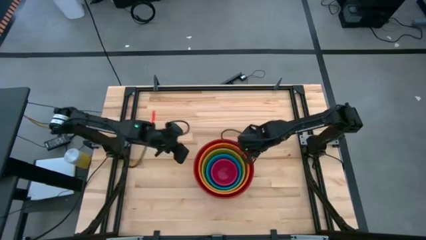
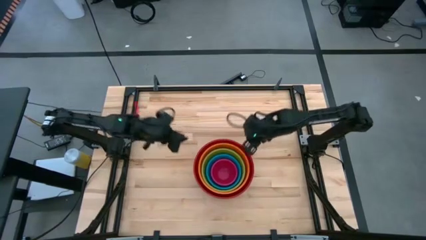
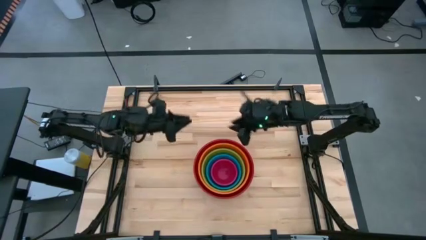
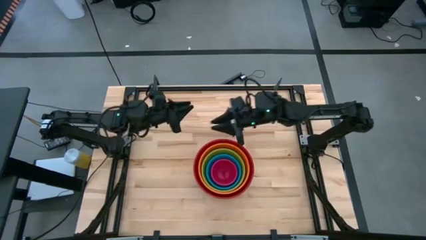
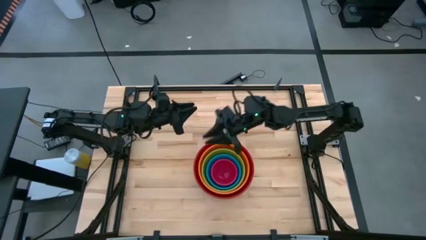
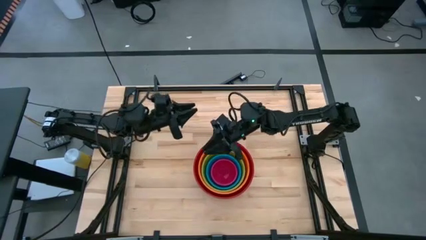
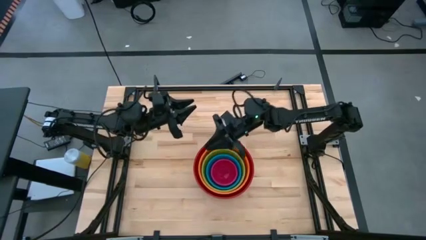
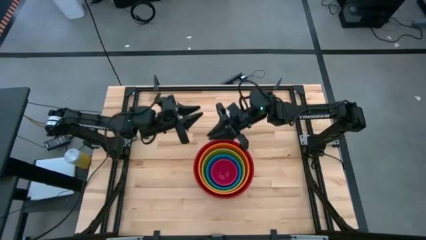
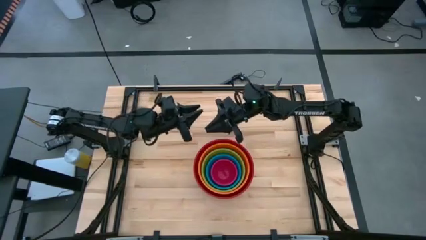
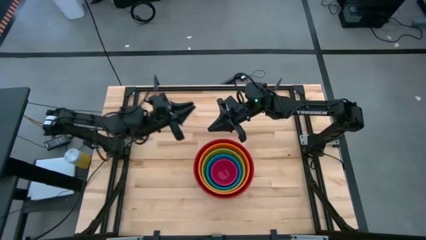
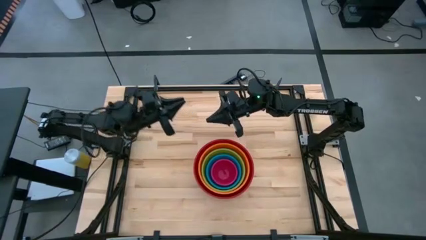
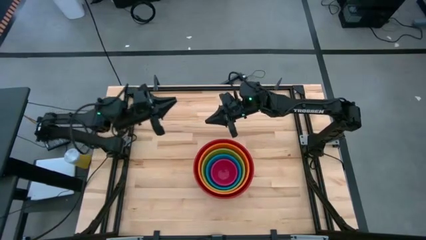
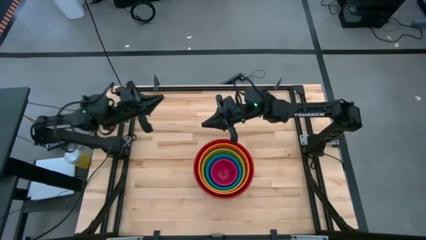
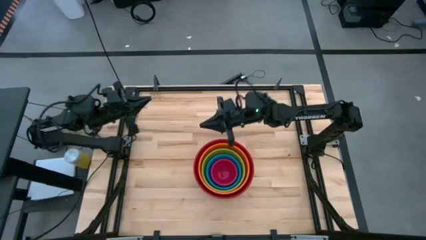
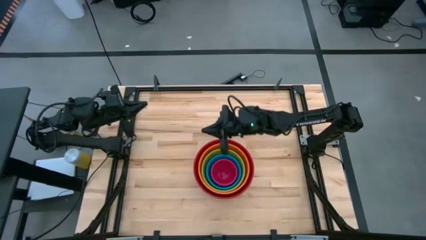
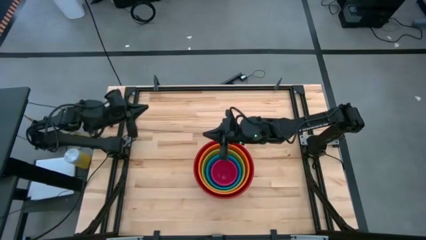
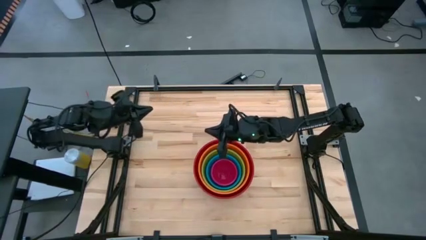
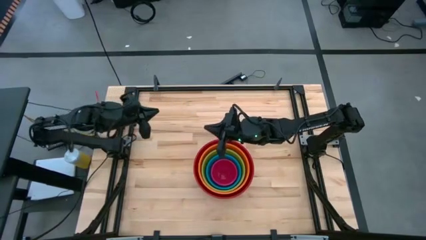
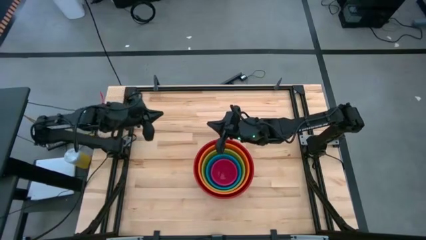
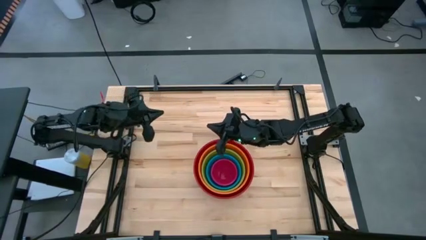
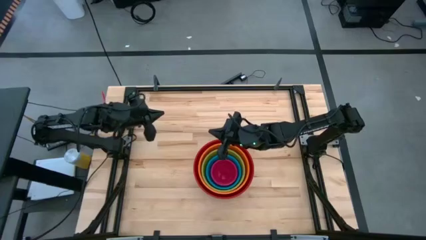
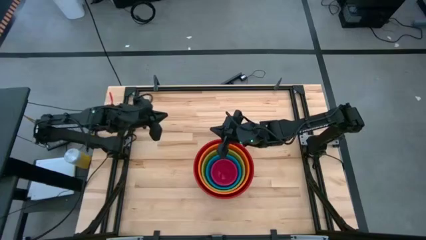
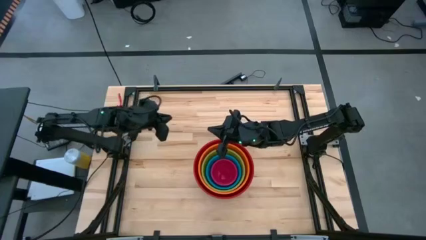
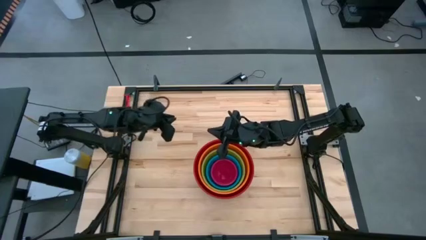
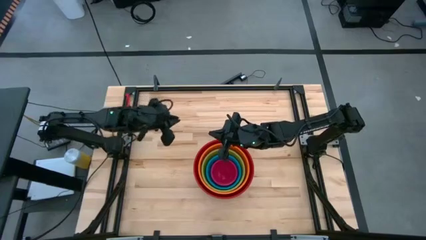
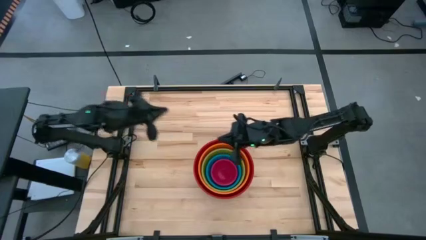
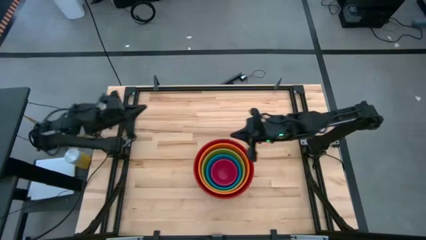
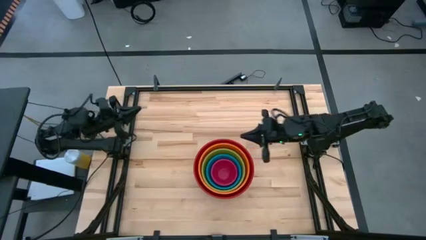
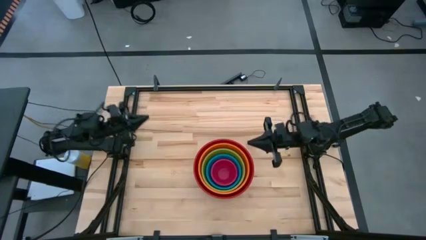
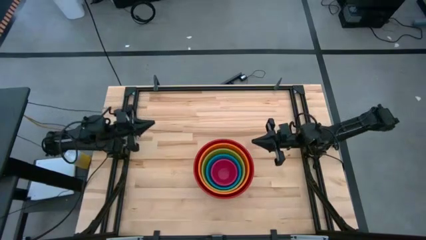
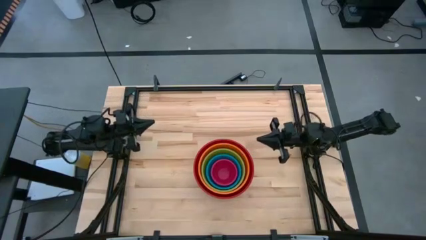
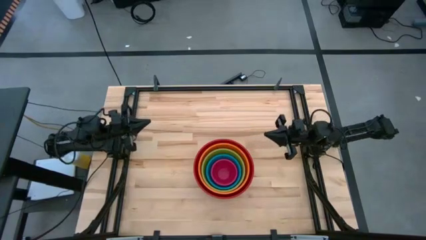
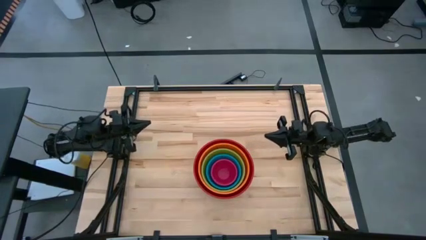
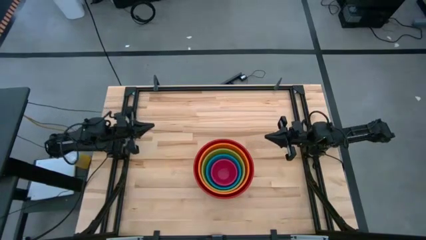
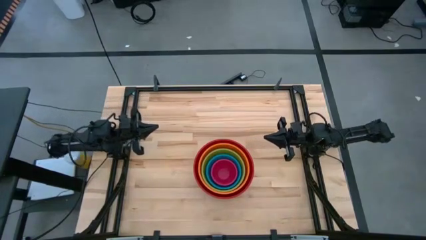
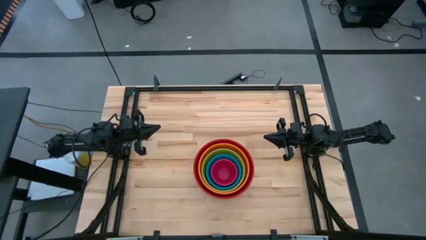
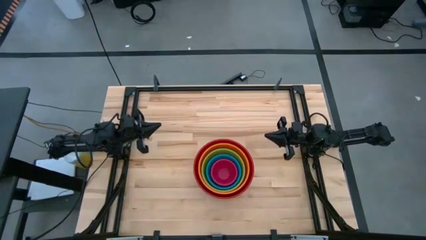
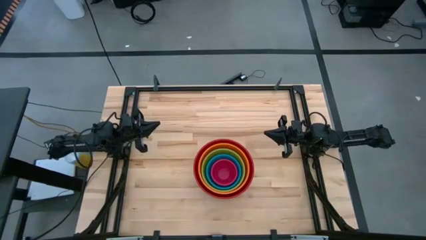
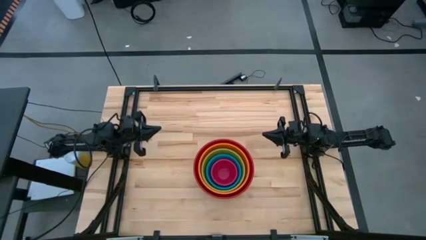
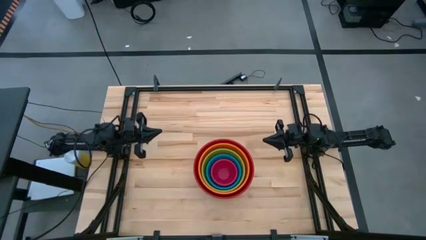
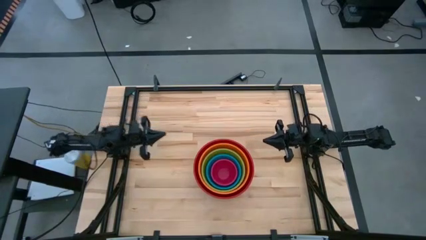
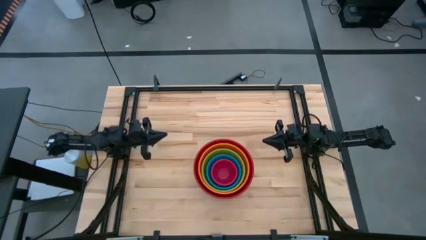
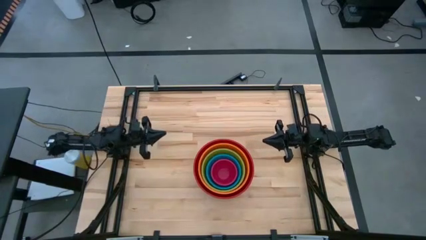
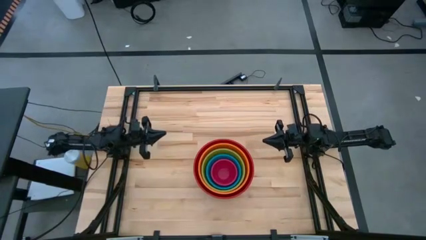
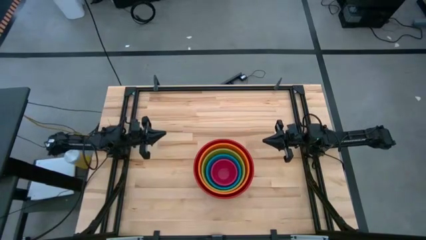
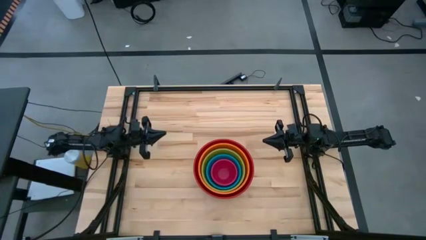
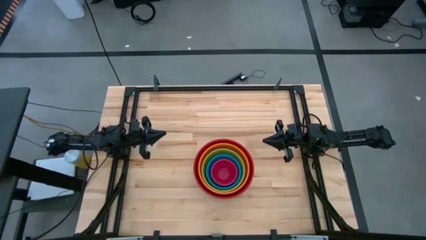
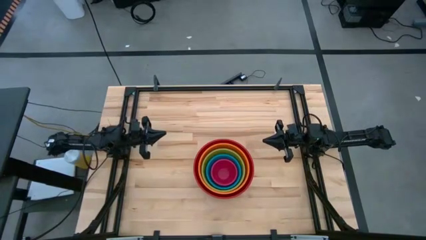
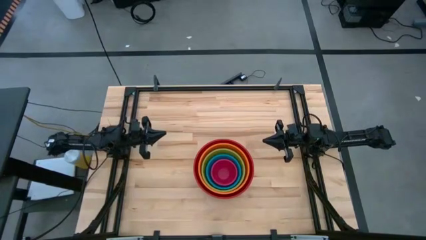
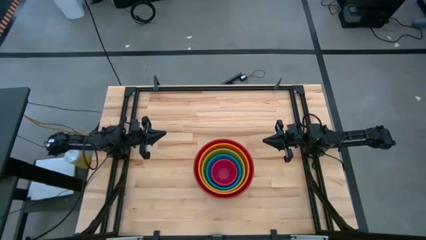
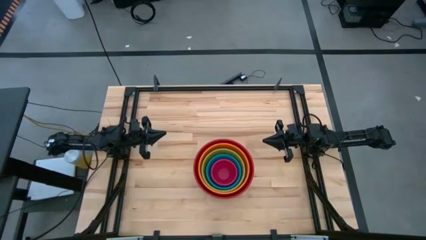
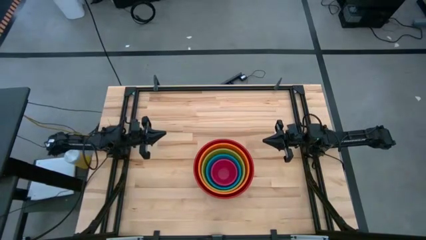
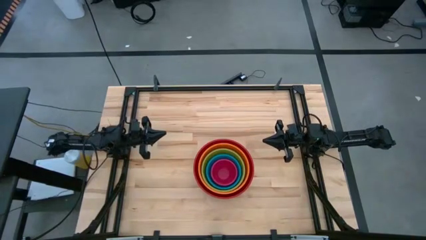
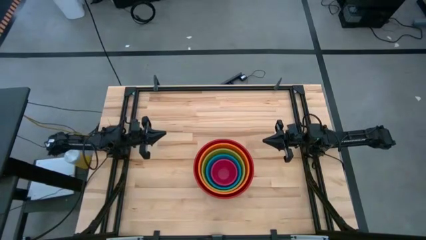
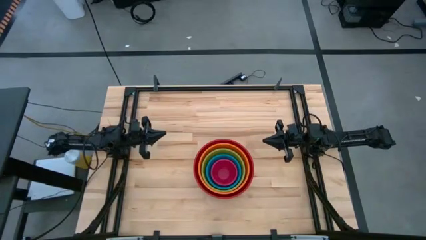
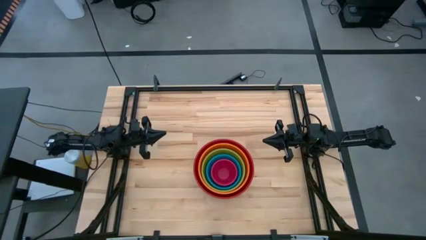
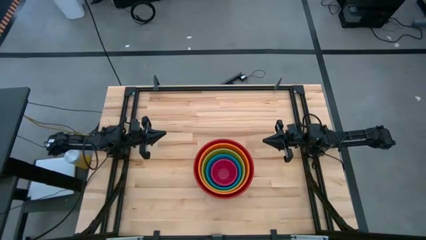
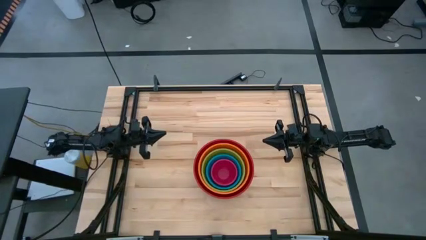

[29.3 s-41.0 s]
Return to Home Position
